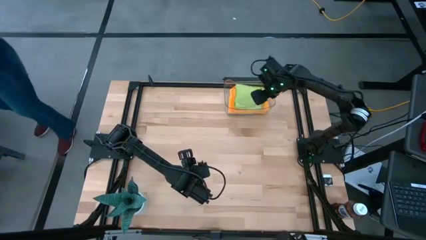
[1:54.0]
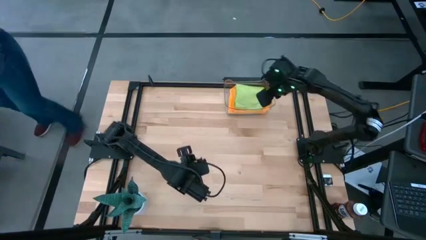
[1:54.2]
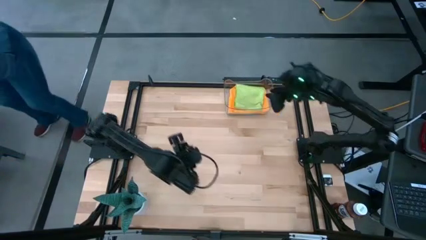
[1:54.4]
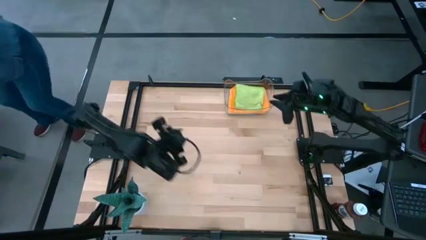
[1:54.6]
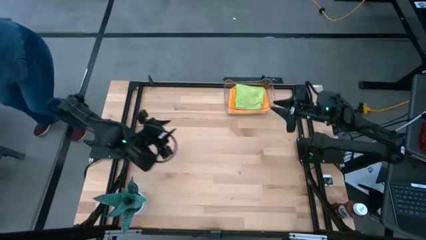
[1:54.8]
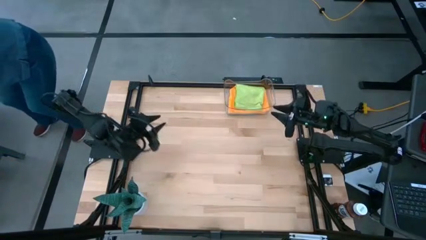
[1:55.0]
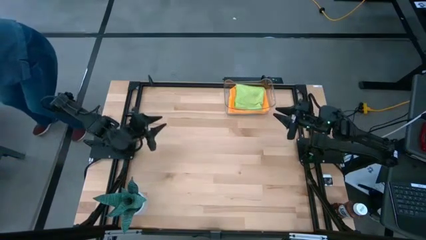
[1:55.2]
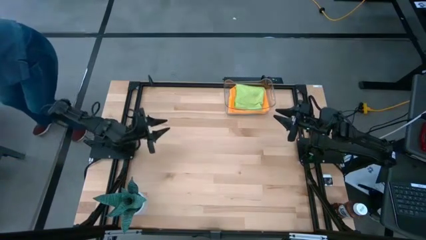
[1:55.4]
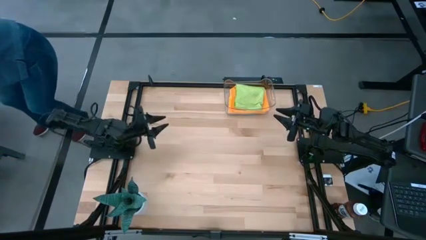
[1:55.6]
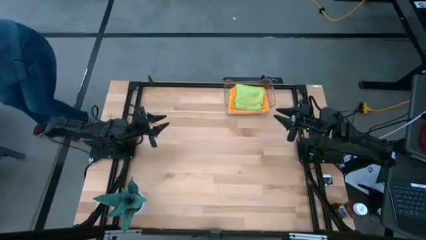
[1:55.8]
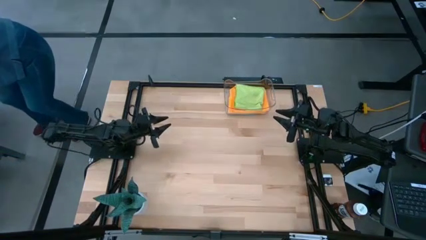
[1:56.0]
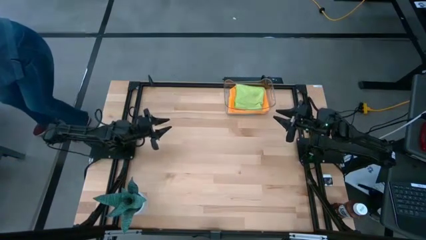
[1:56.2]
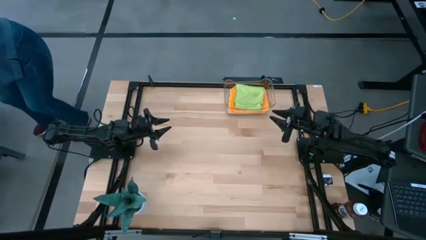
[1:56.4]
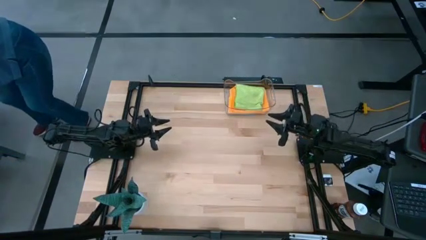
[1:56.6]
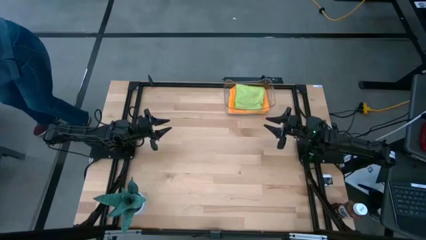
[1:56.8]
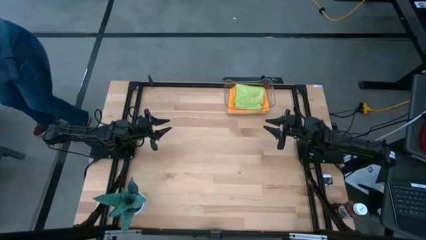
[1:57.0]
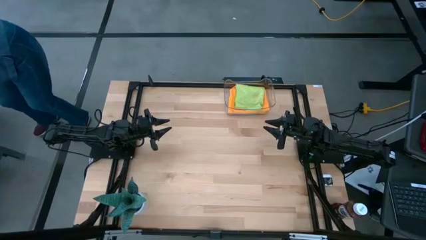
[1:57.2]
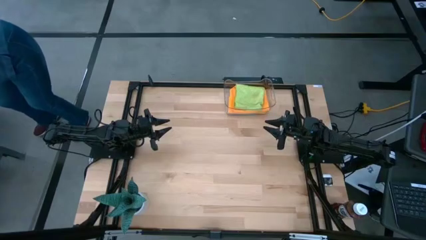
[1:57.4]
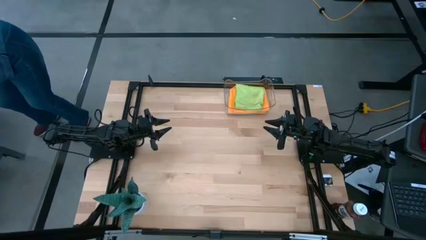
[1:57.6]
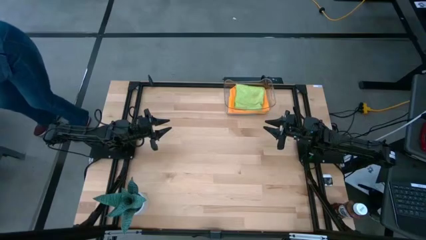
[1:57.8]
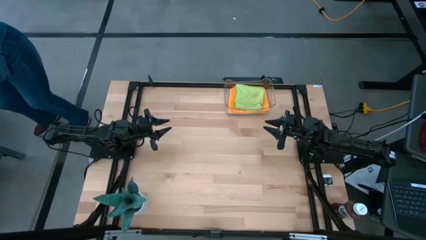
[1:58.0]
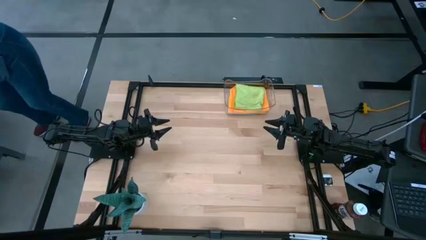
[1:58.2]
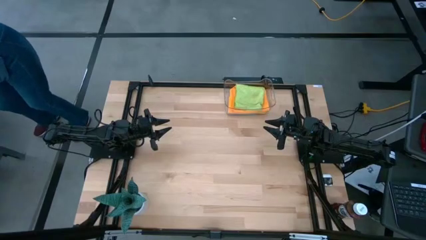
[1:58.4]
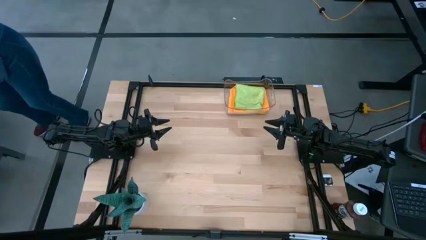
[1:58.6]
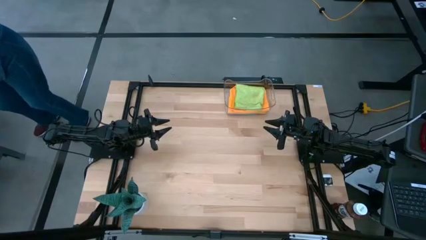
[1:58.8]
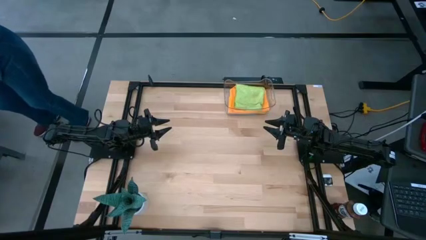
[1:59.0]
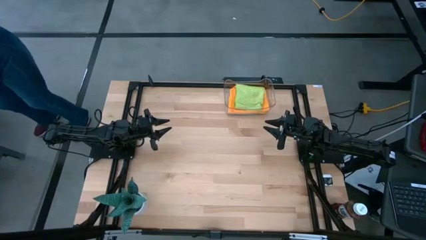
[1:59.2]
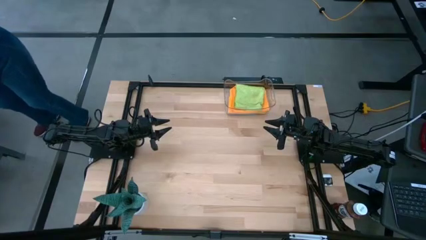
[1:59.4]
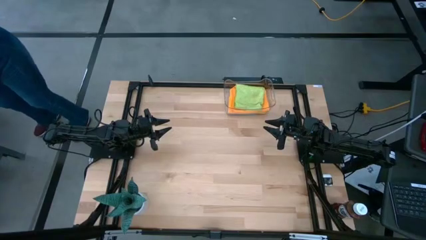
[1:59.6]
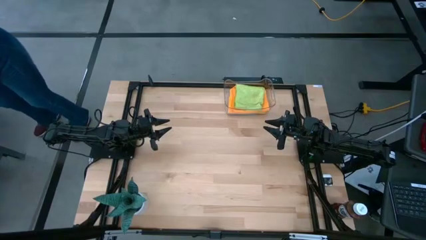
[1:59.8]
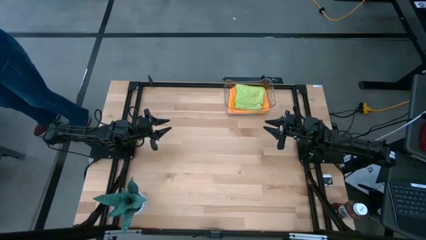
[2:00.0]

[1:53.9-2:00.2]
Task: Fold microfiber towels
Return to Home Position

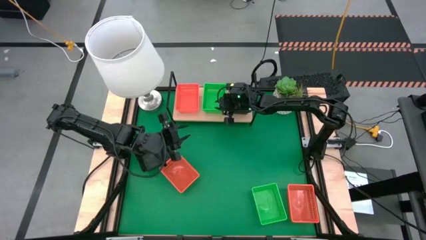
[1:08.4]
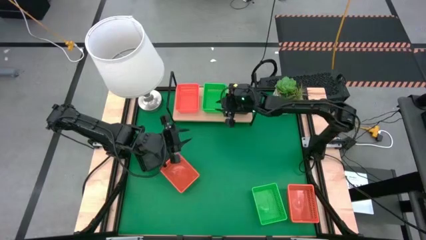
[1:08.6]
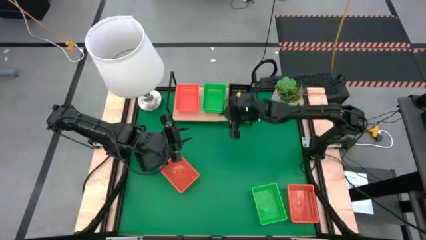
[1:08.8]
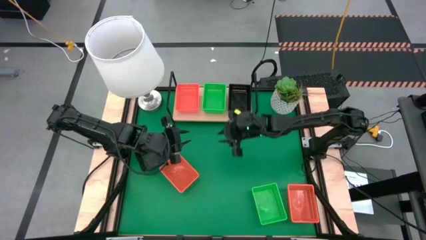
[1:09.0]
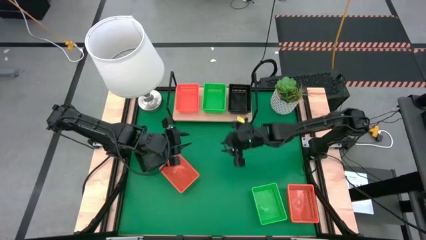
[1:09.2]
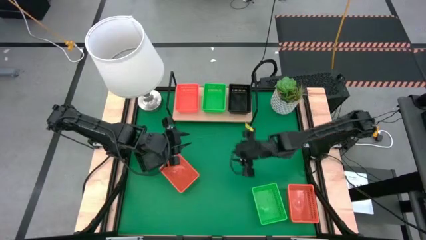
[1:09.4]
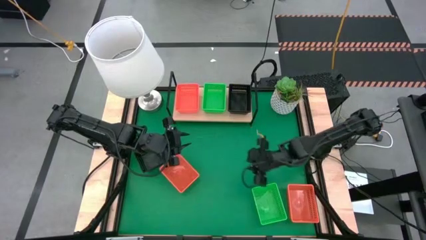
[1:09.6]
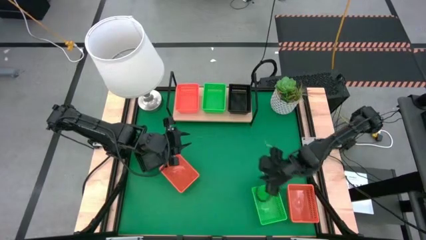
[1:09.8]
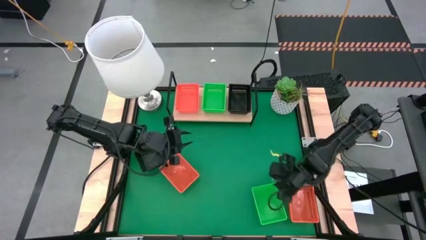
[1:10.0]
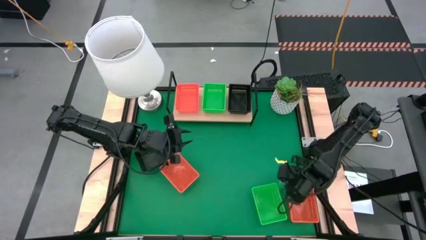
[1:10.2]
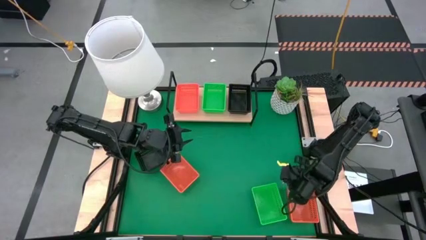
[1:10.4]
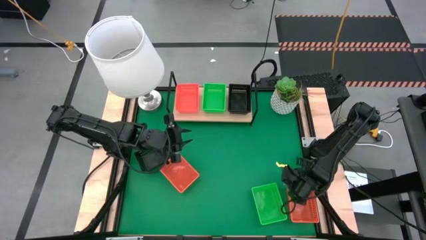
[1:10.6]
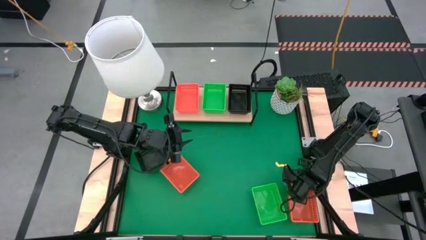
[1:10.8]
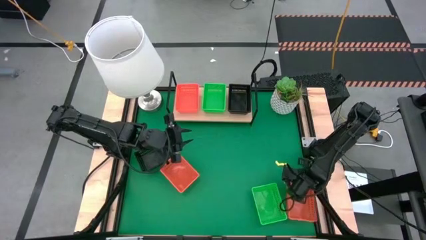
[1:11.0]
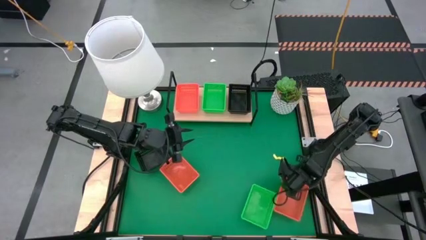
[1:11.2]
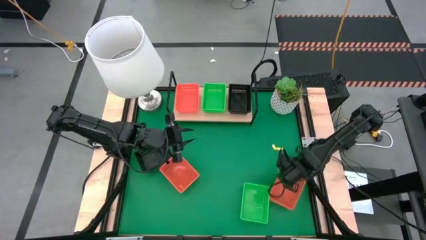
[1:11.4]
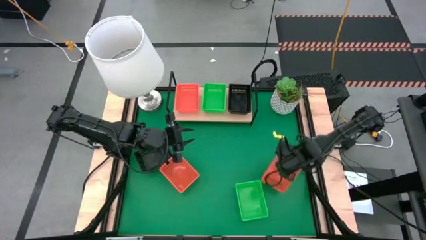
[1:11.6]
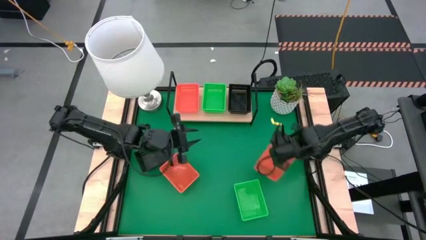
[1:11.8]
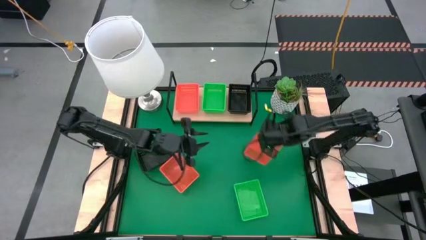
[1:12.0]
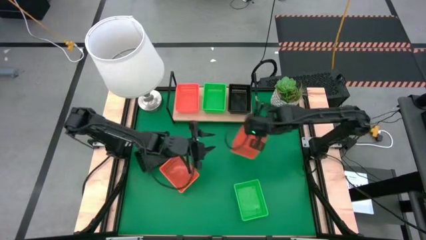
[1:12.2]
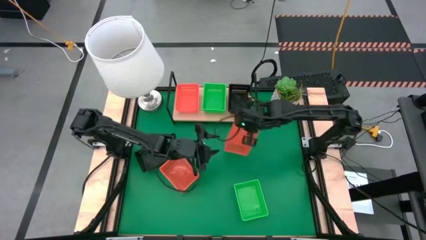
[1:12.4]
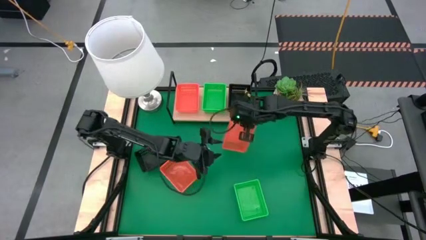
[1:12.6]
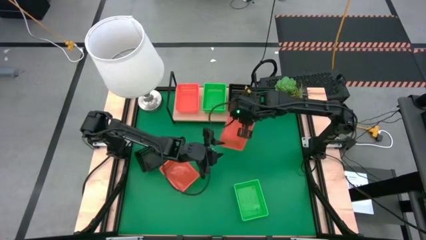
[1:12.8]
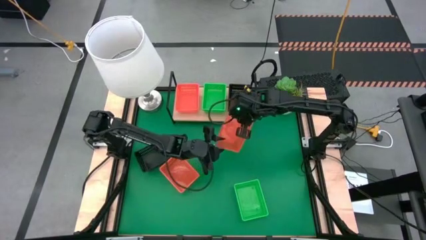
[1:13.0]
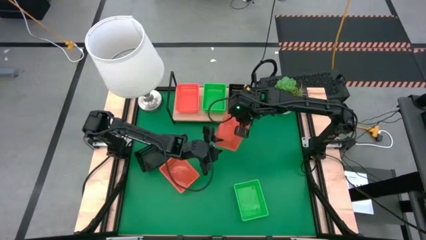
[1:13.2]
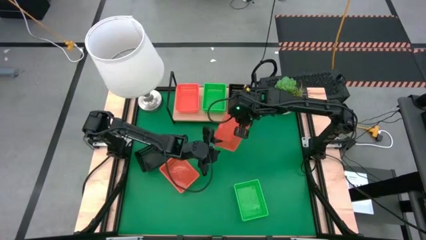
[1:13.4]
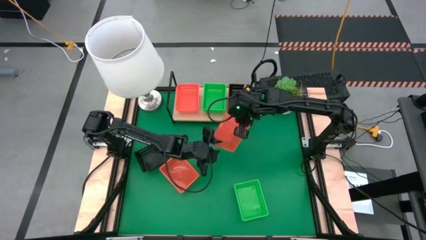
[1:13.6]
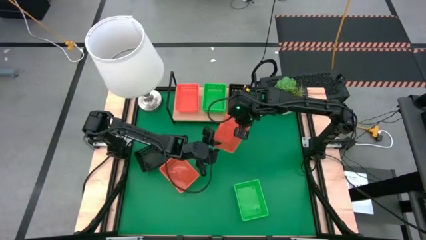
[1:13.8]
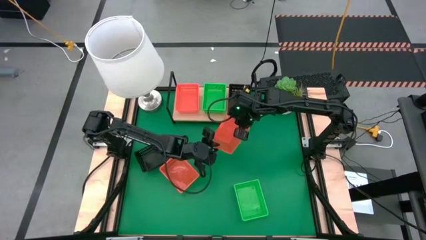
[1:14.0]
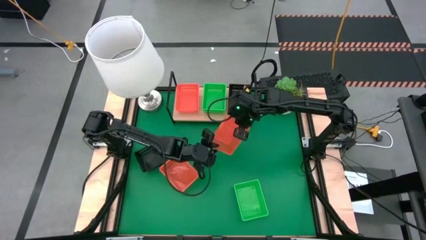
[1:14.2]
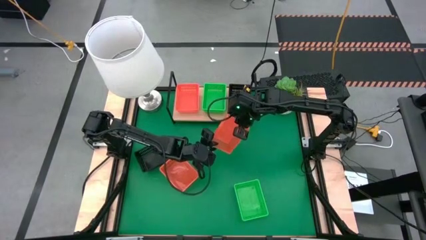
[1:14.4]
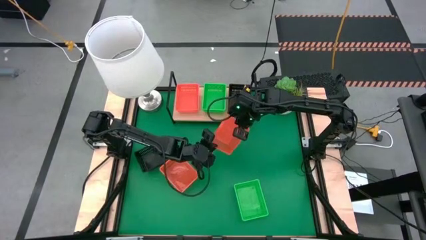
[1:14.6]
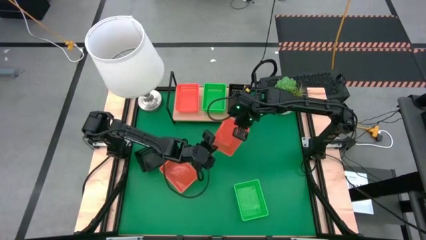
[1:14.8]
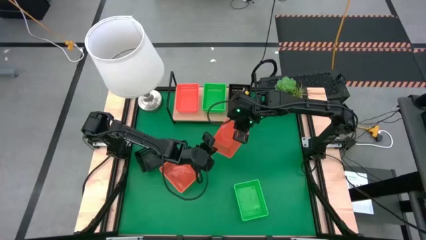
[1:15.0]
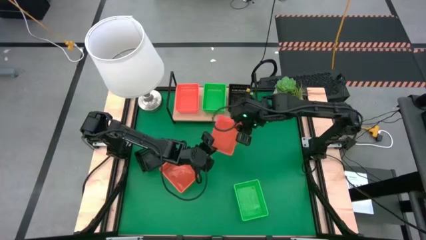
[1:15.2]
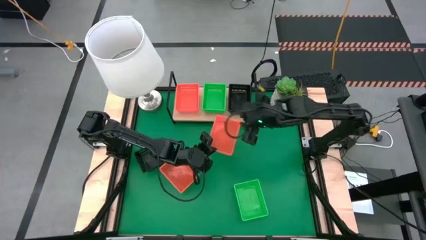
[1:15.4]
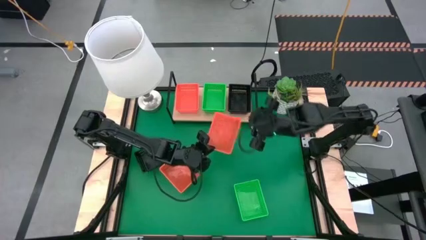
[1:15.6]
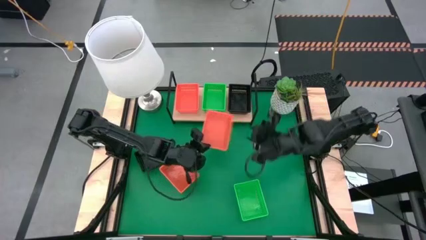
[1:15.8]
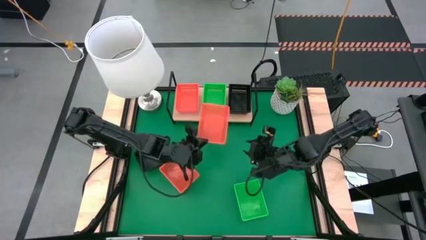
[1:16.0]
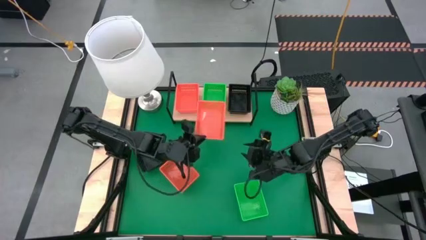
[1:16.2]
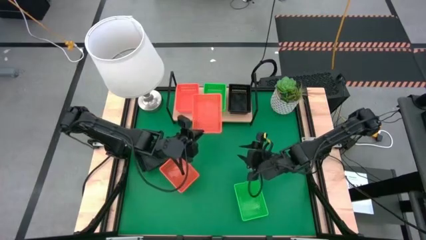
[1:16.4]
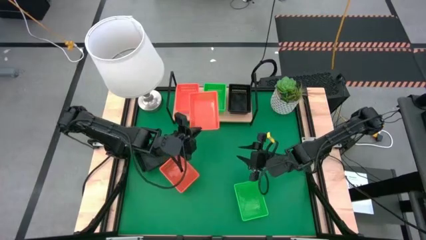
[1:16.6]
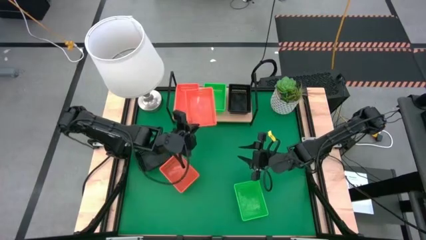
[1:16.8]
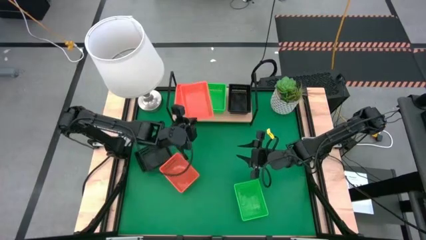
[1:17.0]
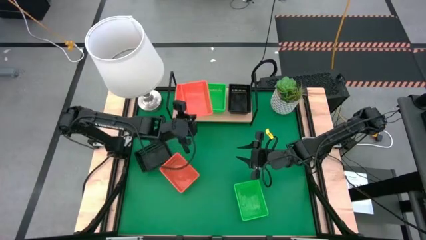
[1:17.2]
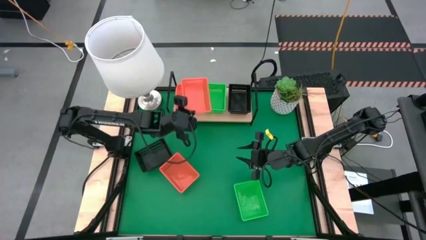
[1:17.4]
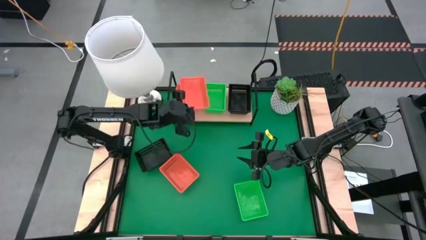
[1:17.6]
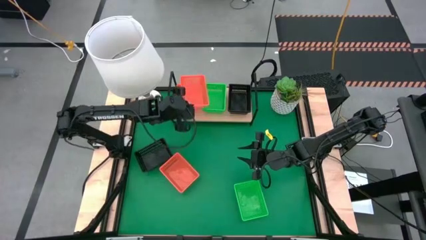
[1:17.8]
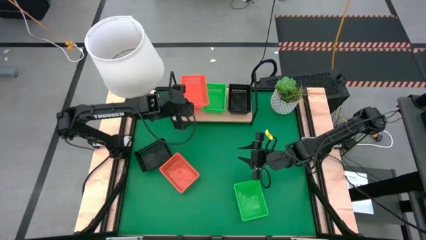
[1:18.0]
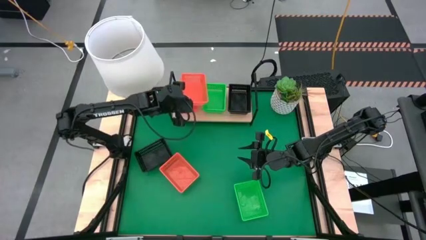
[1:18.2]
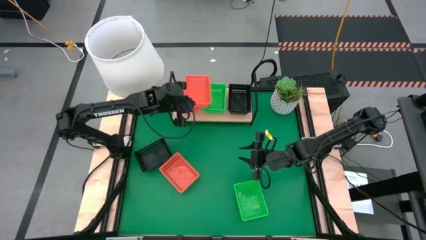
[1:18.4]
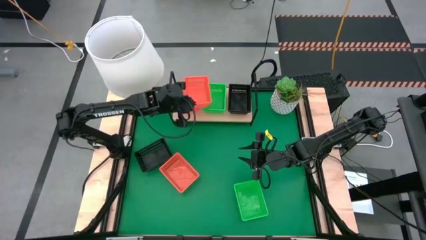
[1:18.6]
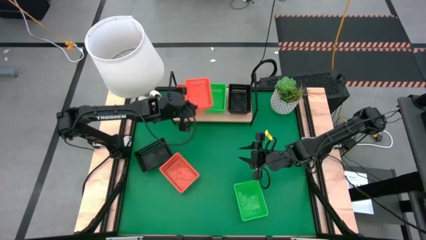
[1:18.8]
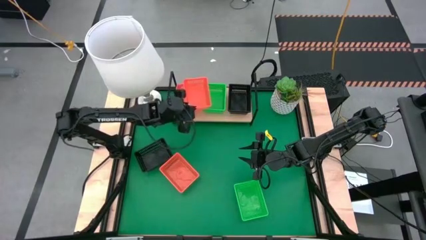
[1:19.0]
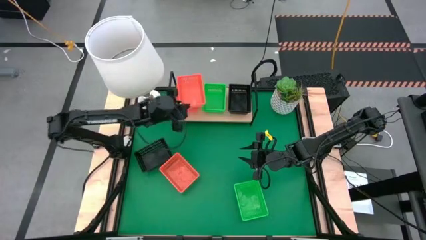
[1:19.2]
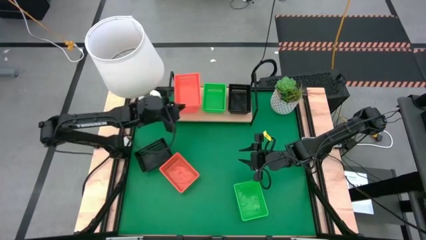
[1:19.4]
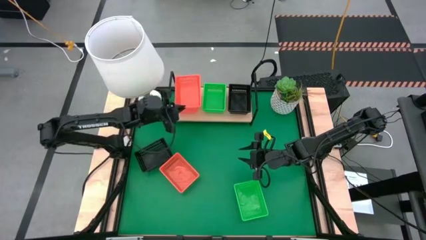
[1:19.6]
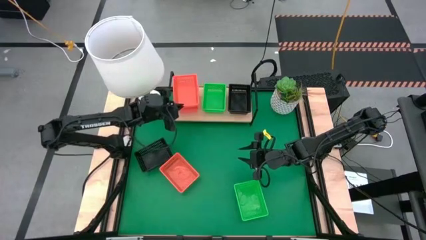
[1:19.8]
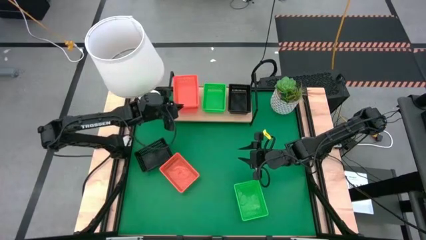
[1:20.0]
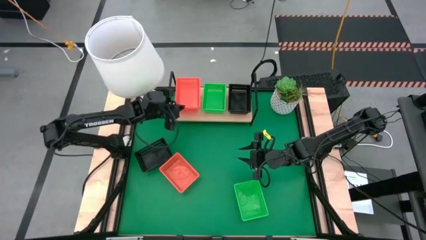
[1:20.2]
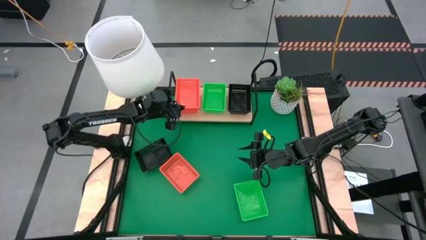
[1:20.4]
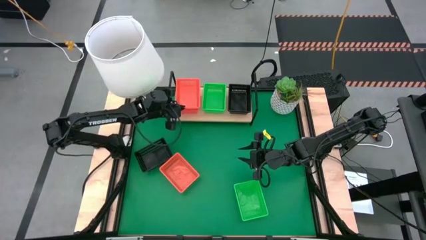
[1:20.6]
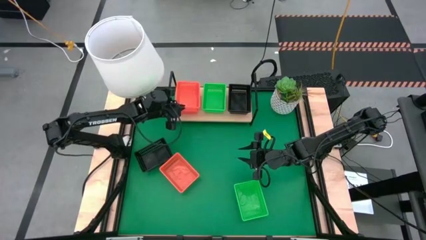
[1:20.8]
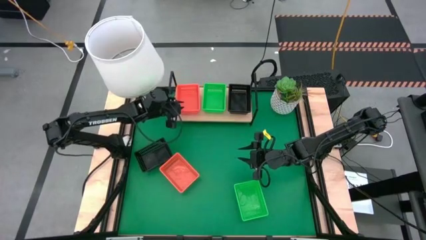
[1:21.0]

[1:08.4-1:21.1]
Task: Stack baskets on shelf by color
Stack the right orange bin on the orange bin on the shelf
